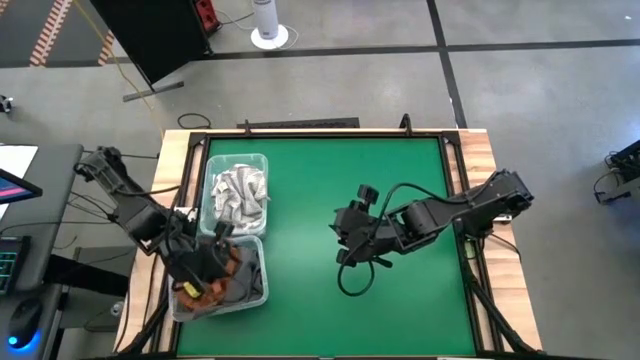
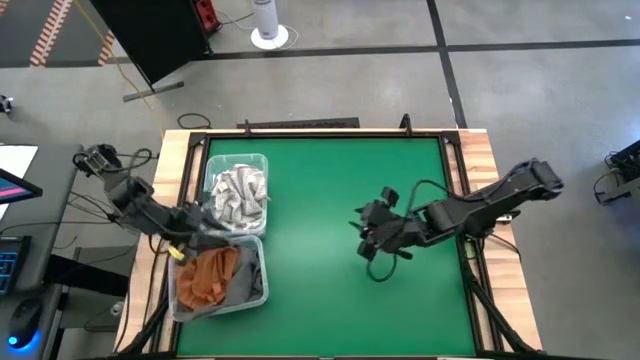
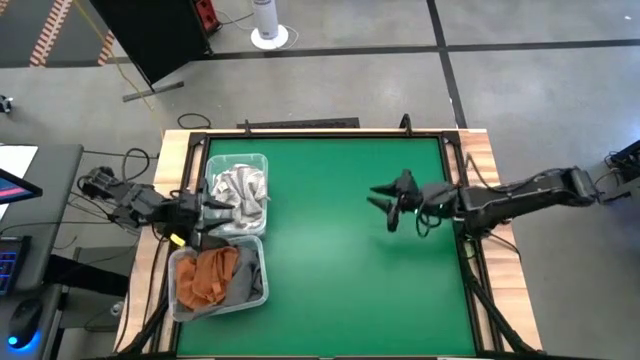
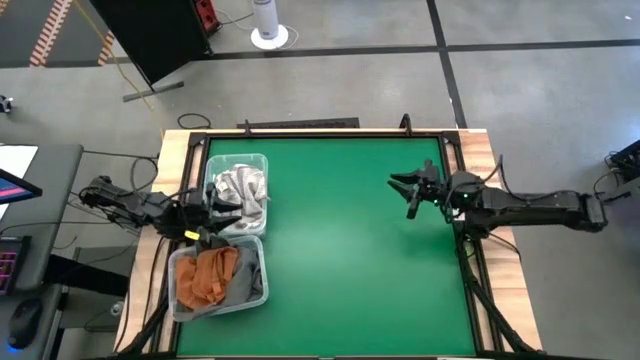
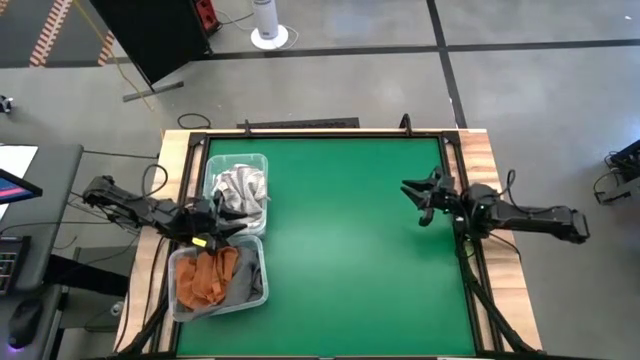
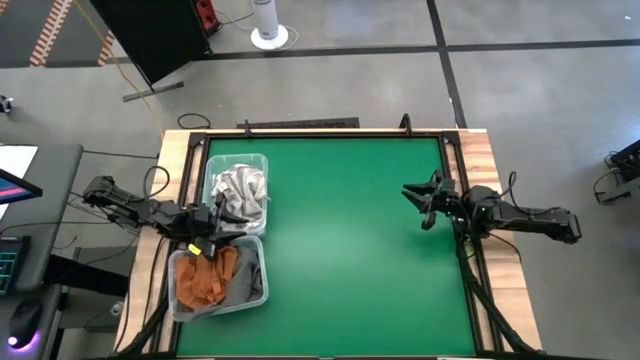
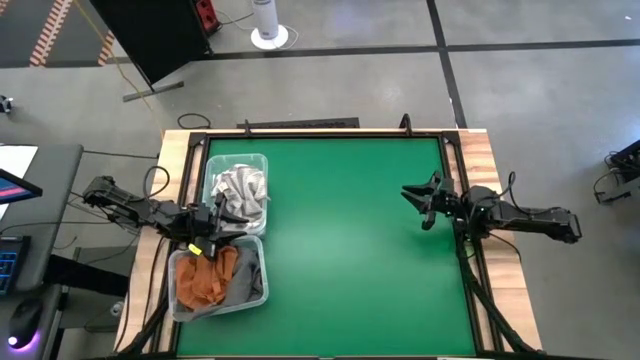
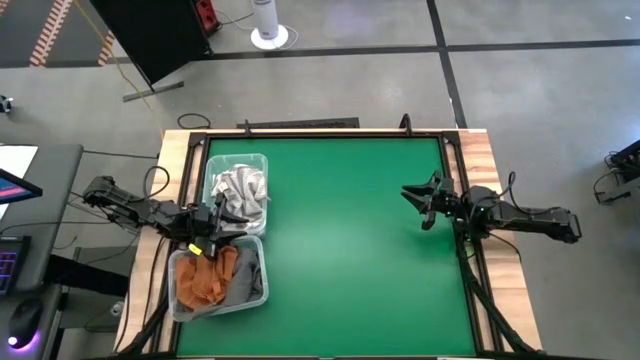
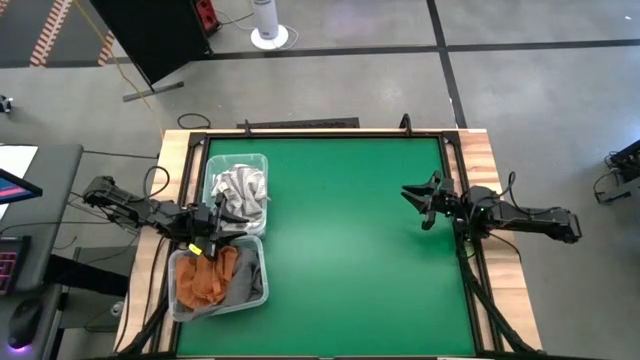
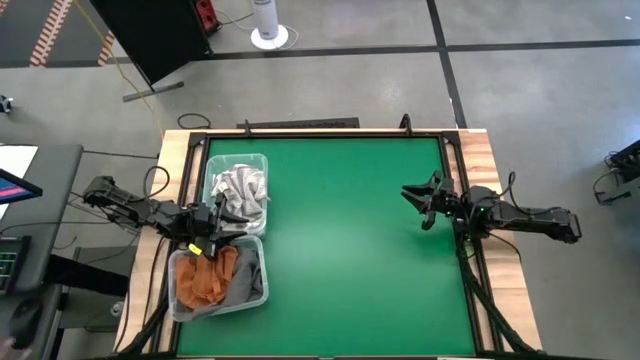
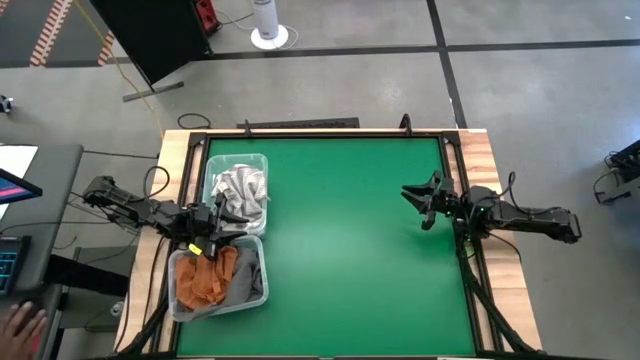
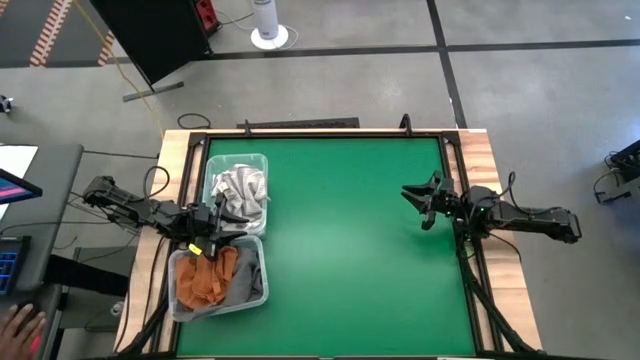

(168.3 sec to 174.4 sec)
Task: Sort towels by color in basket
Return to Home Position

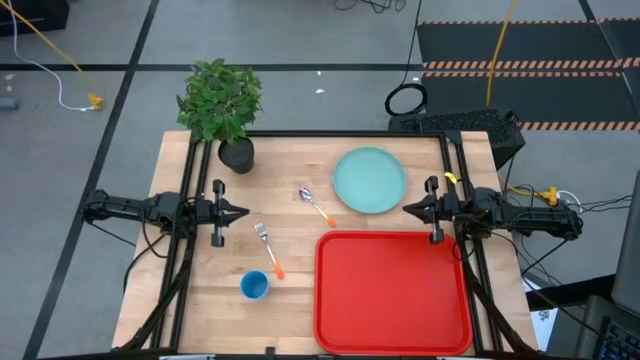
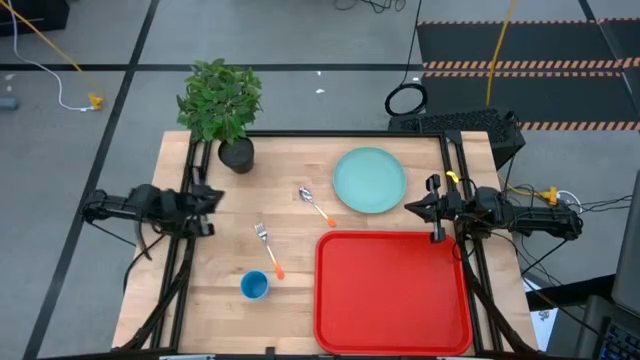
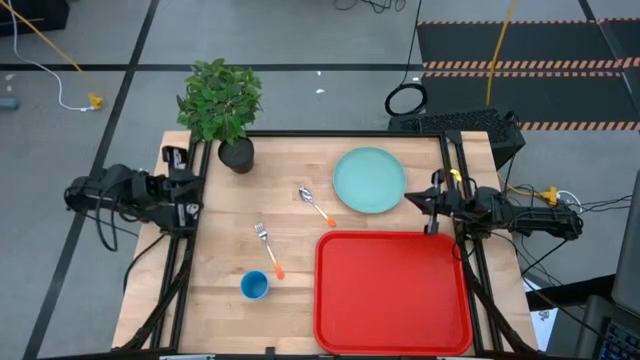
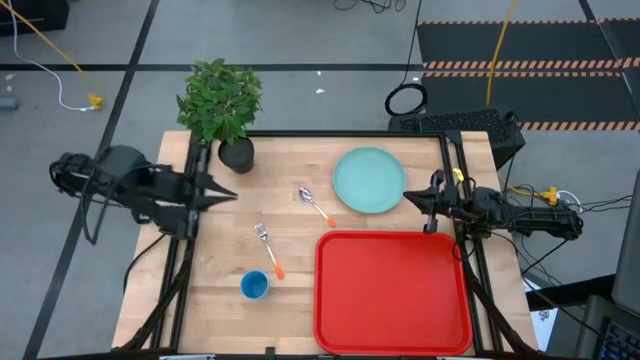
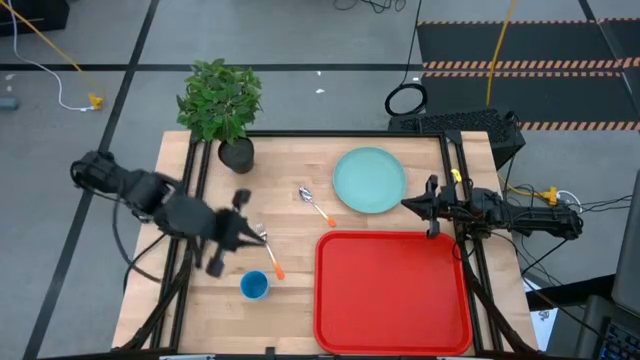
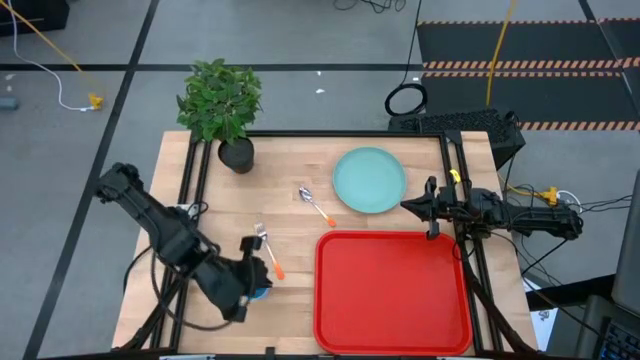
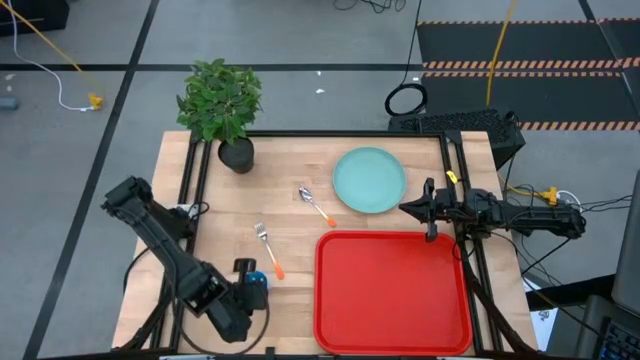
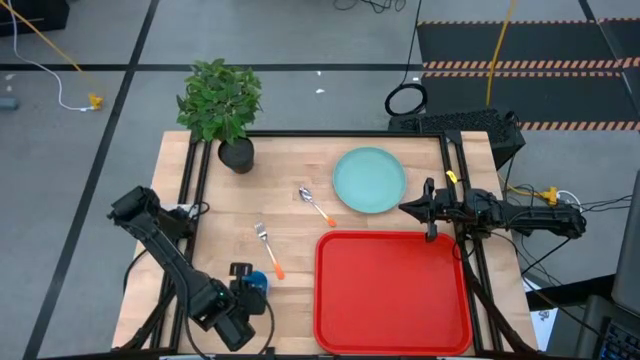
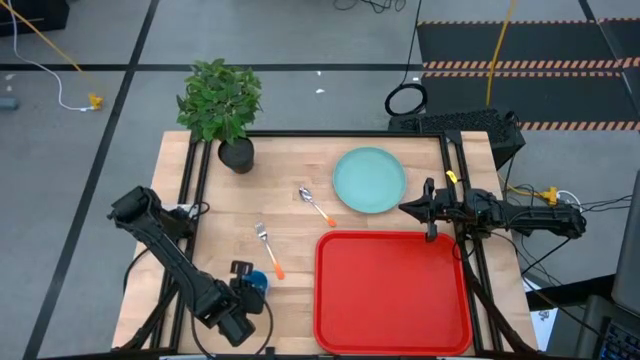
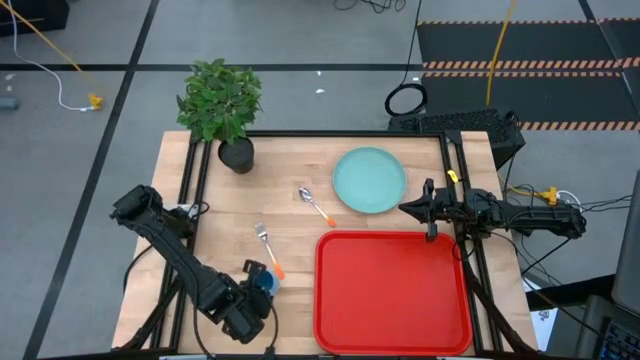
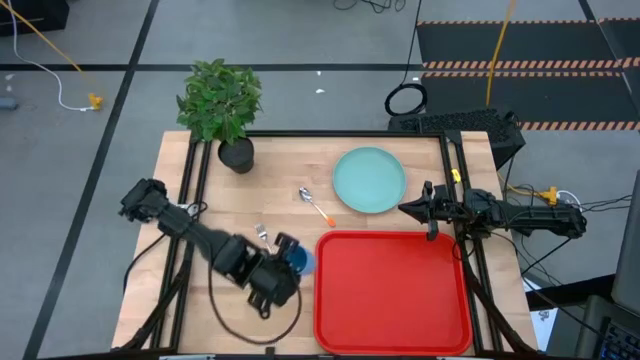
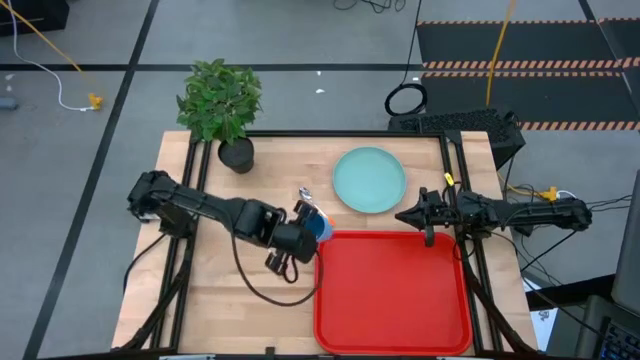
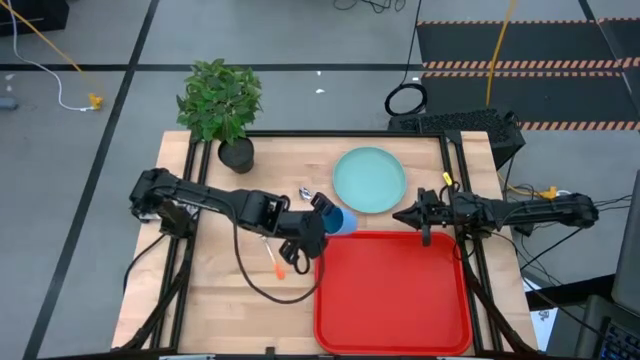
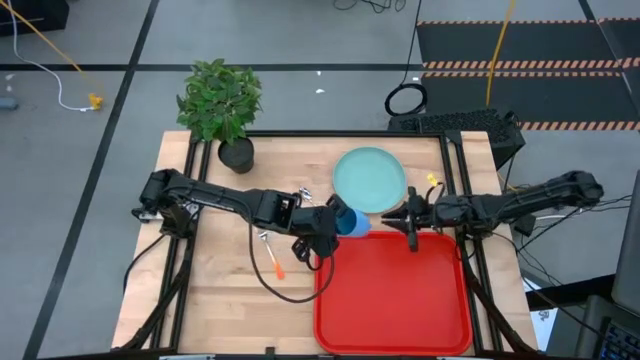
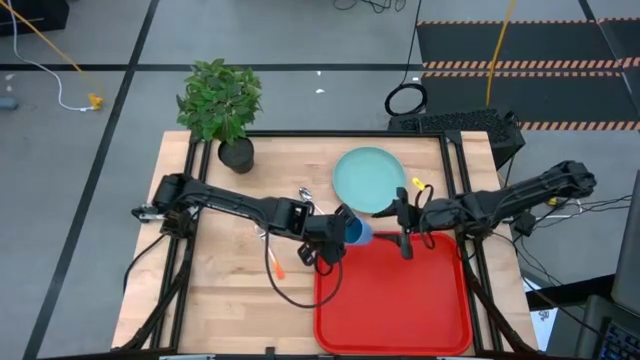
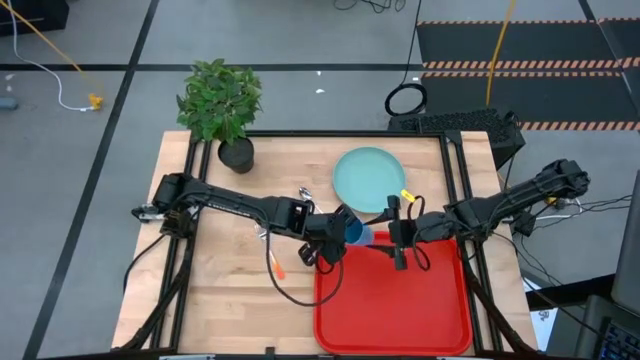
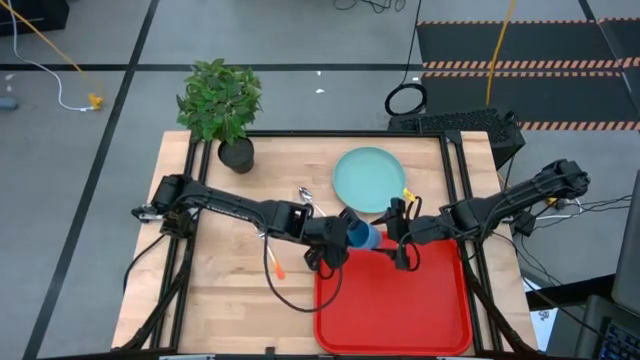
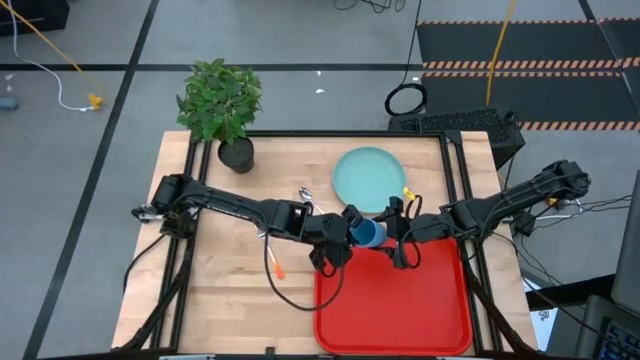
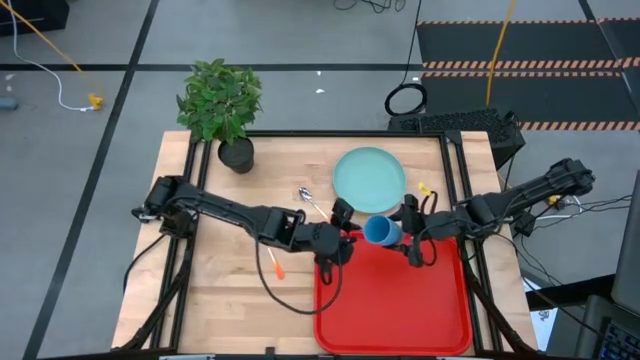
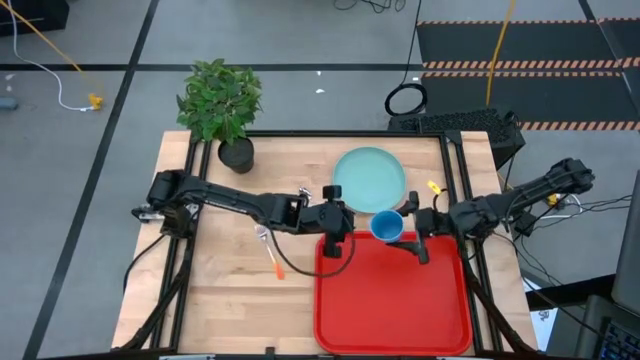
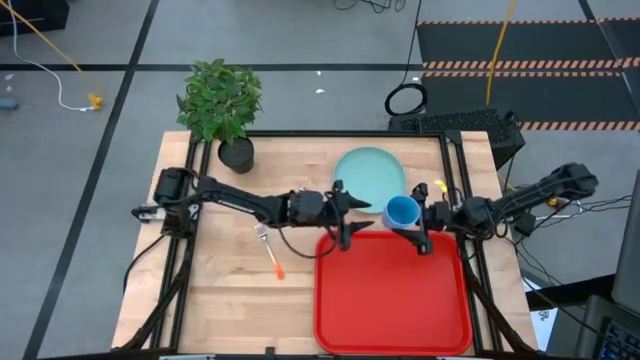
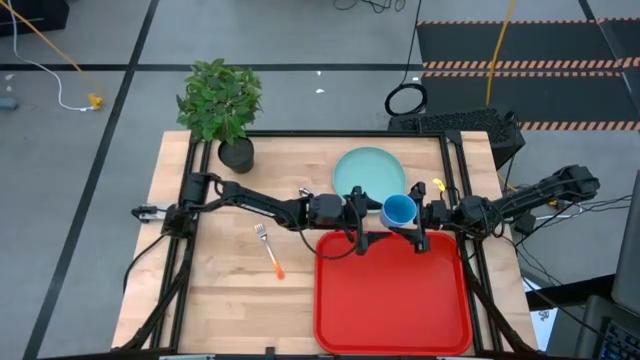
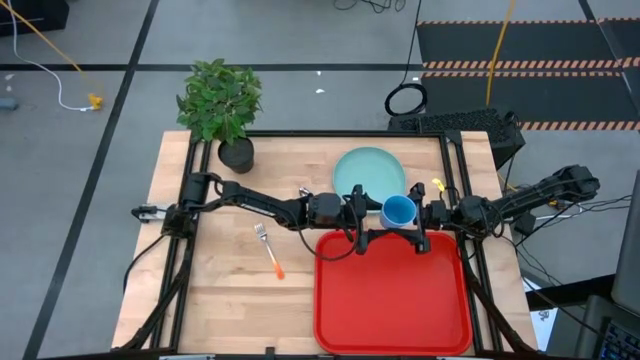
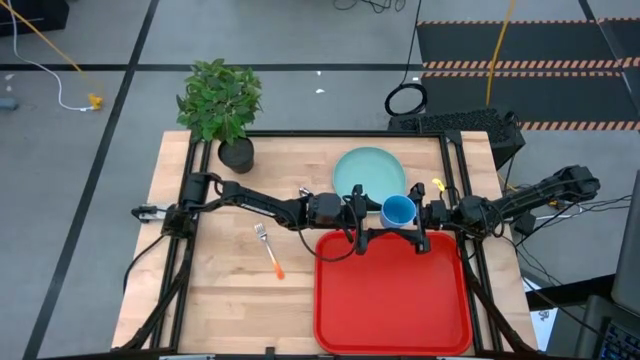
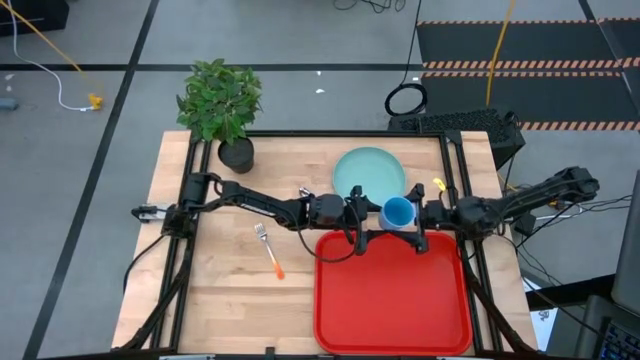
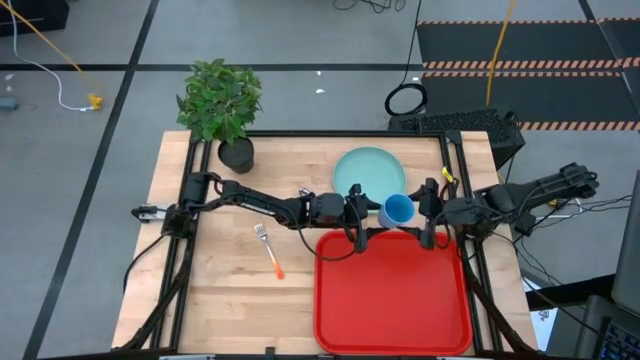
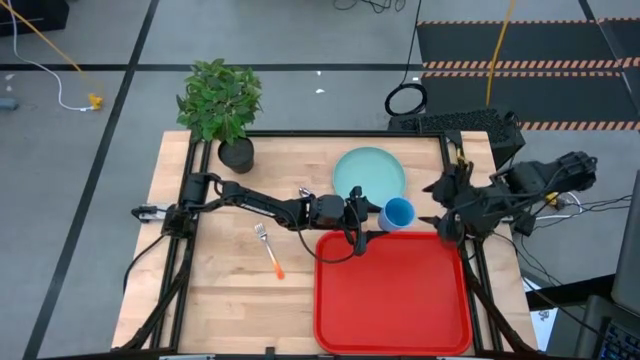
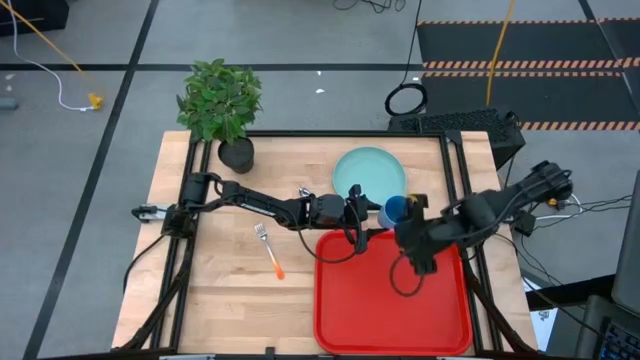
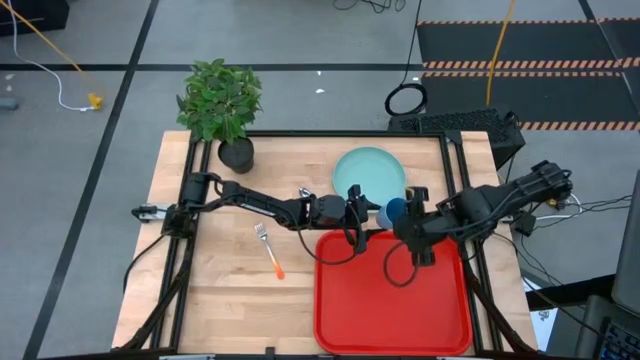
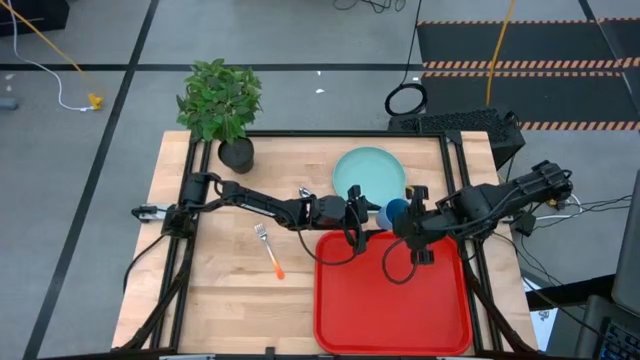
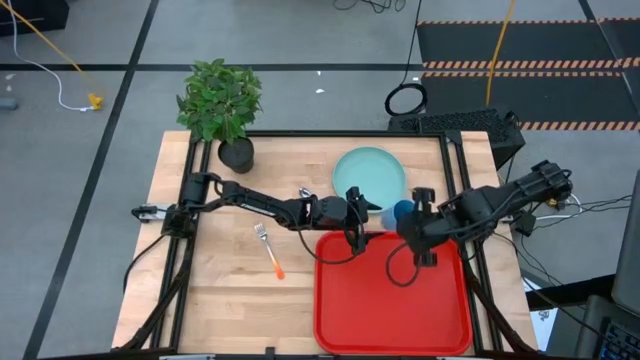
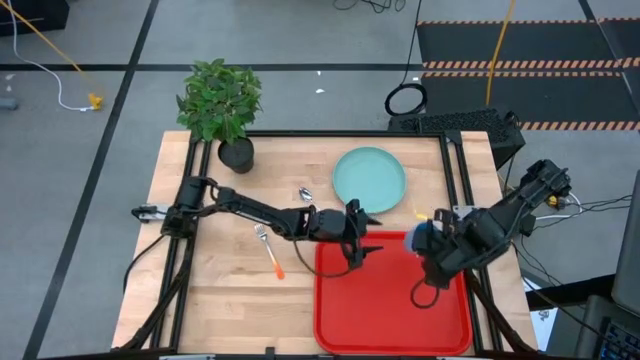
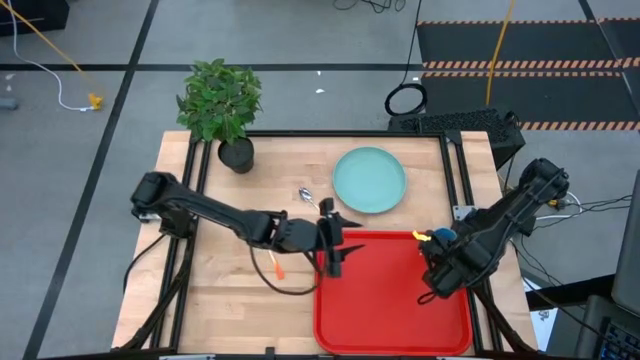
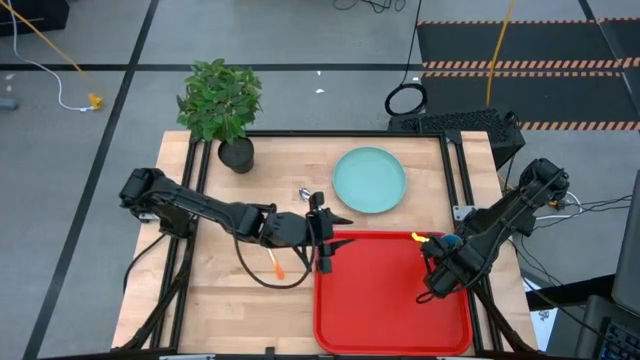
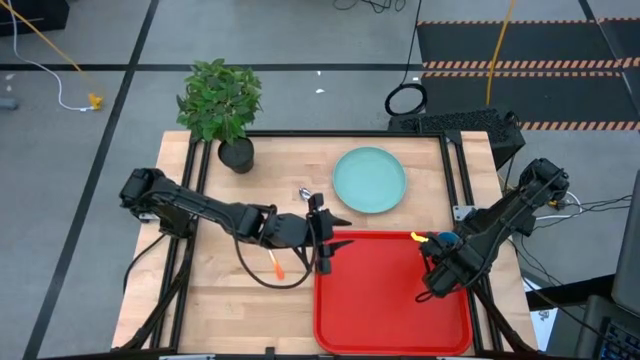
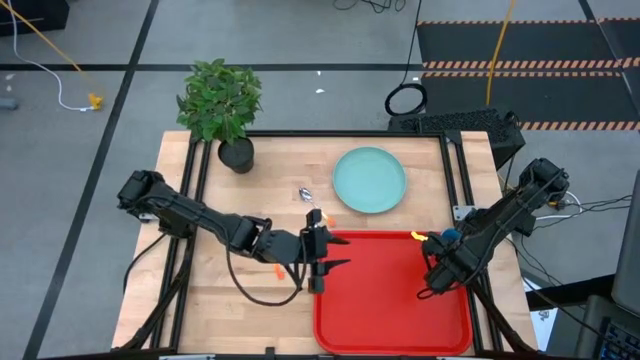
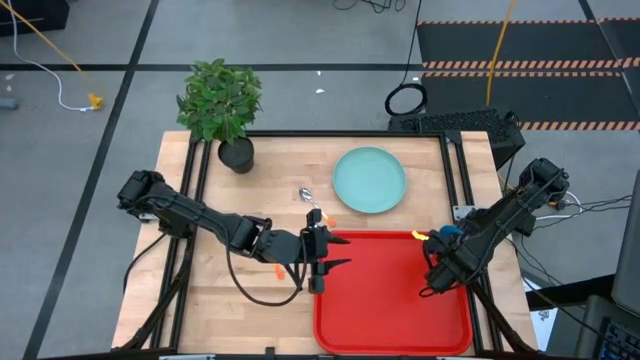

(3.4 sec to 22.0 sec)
Task: Pick and place plate/cup/fork/spoon on tray
Put the blue cup on the top right of the red serving tray
